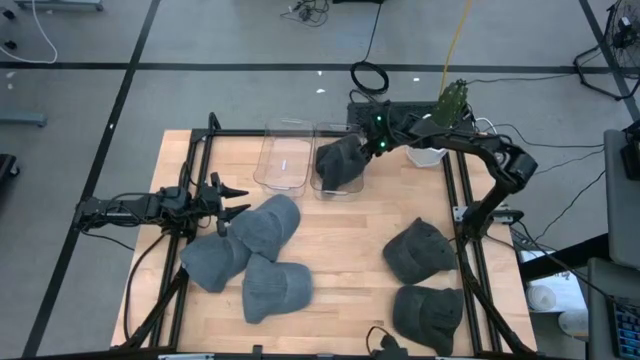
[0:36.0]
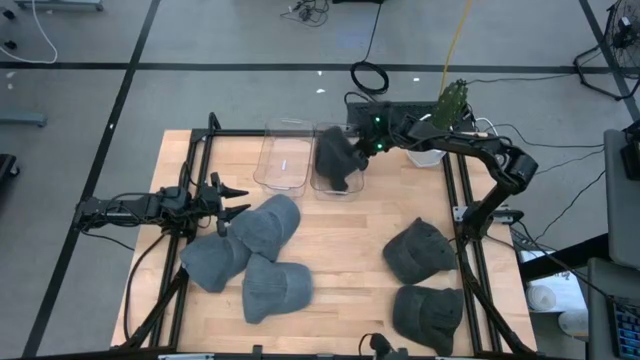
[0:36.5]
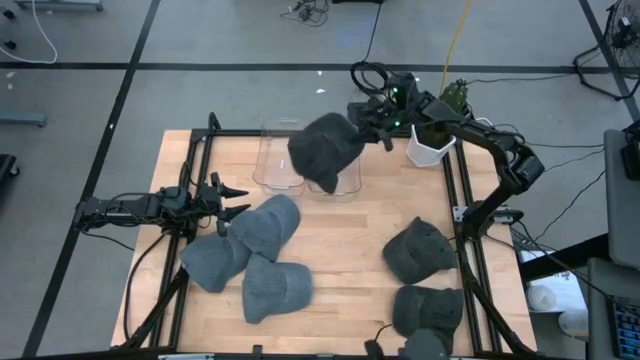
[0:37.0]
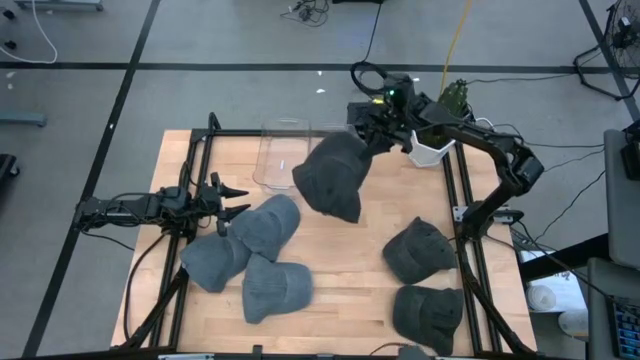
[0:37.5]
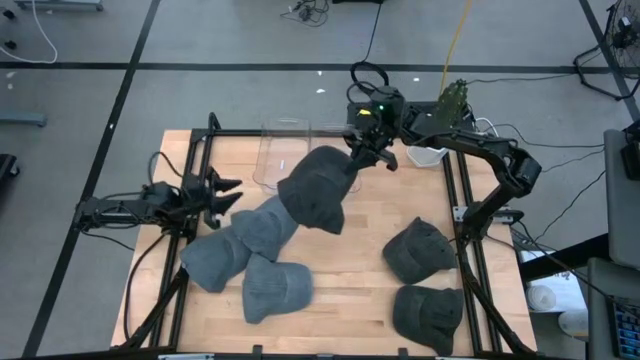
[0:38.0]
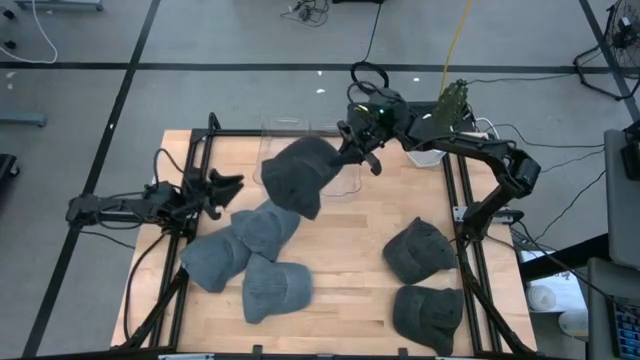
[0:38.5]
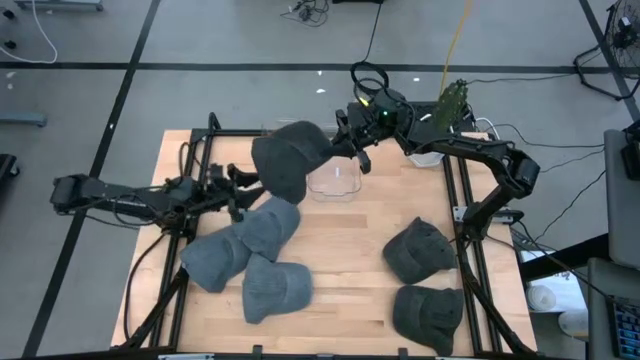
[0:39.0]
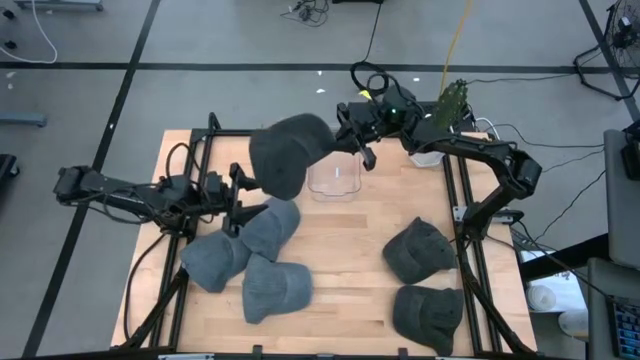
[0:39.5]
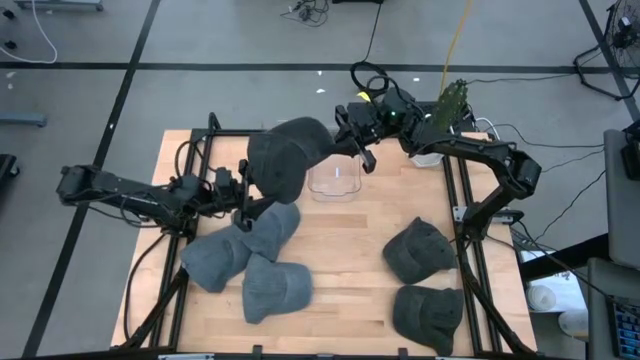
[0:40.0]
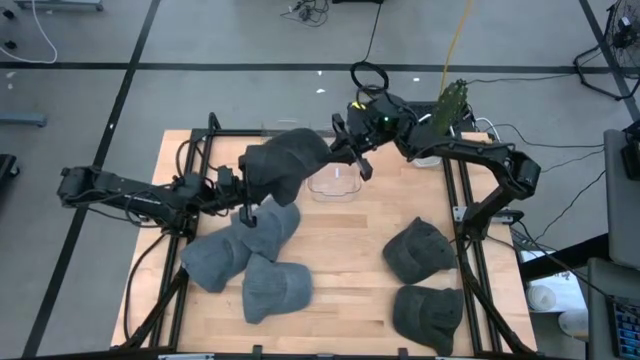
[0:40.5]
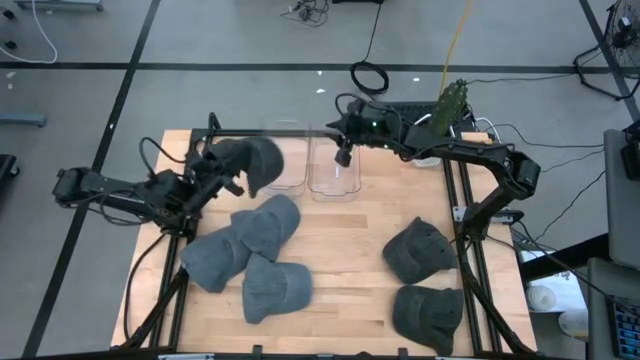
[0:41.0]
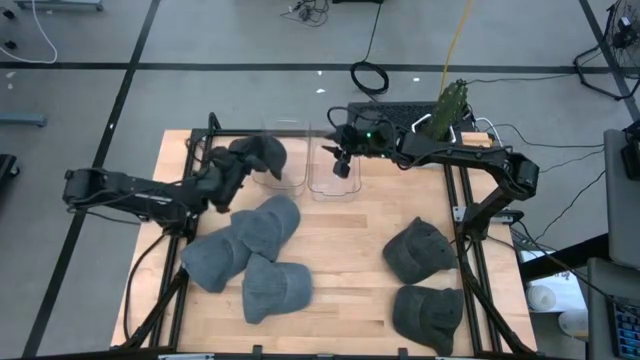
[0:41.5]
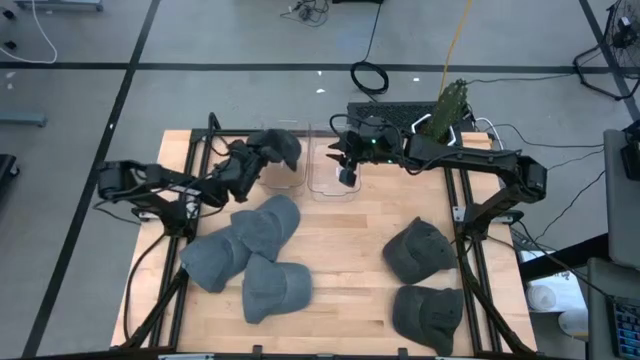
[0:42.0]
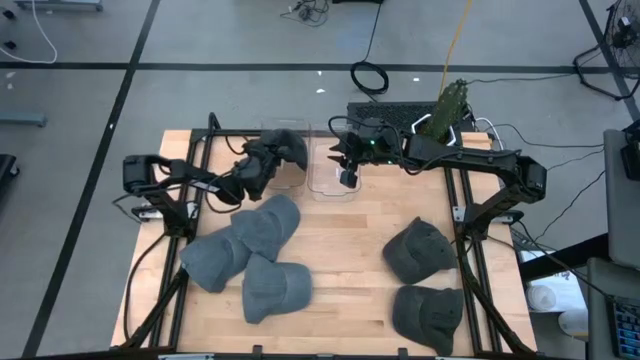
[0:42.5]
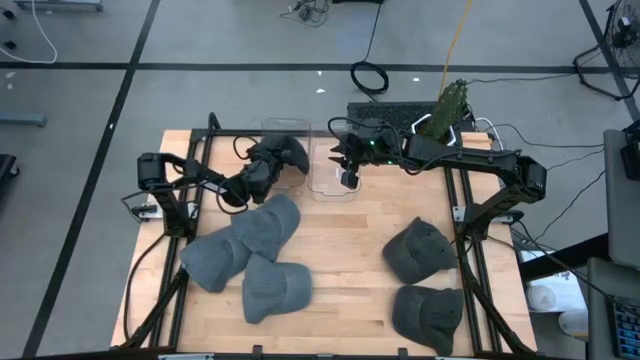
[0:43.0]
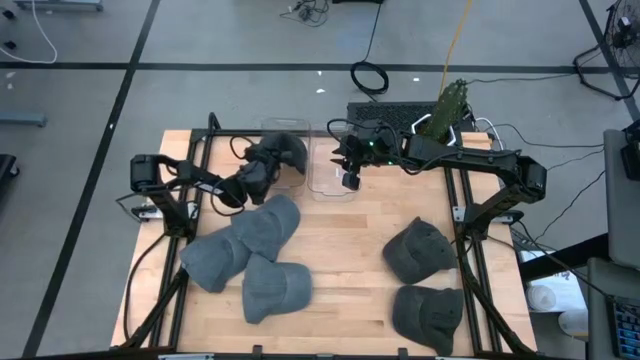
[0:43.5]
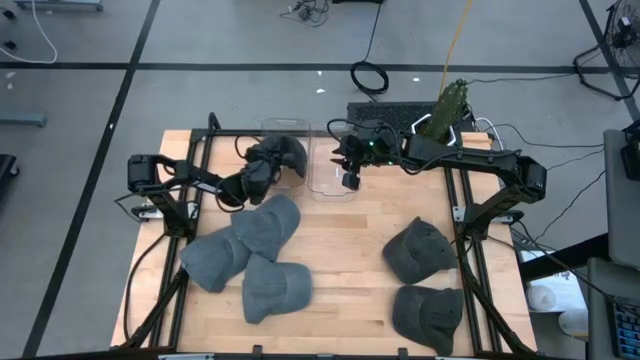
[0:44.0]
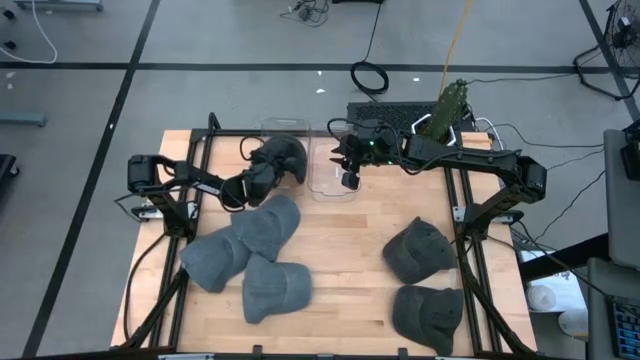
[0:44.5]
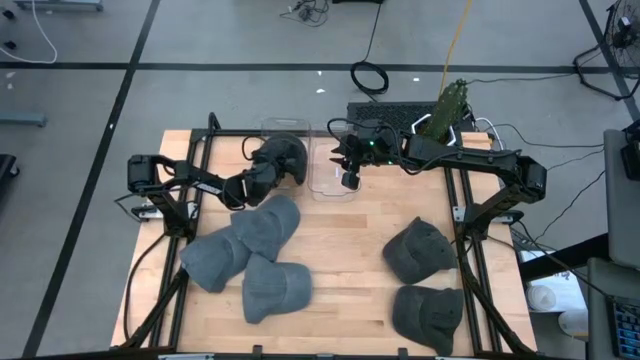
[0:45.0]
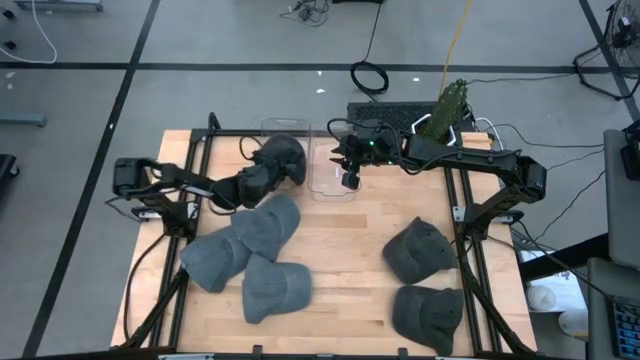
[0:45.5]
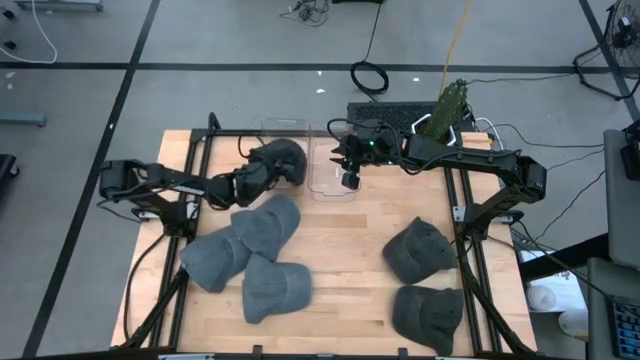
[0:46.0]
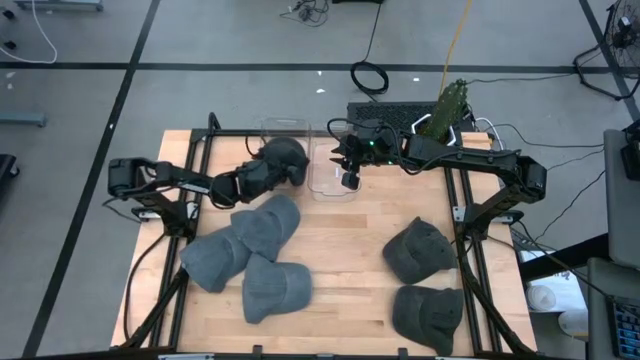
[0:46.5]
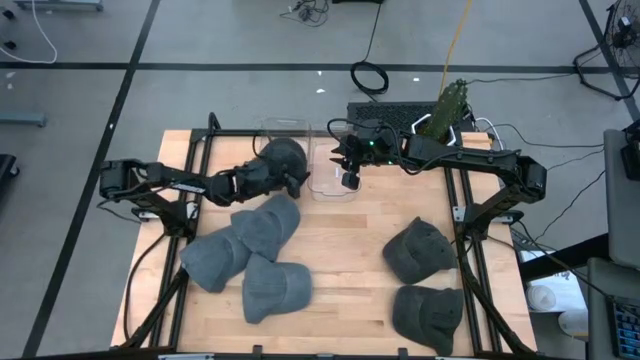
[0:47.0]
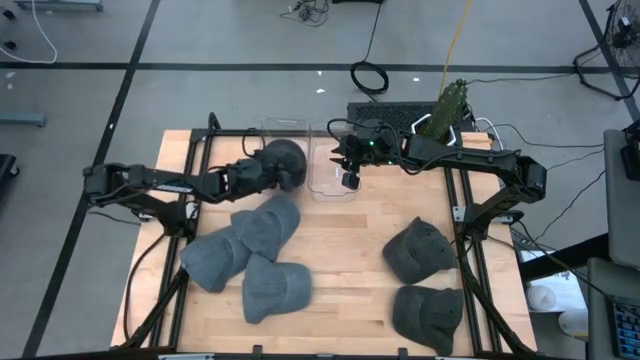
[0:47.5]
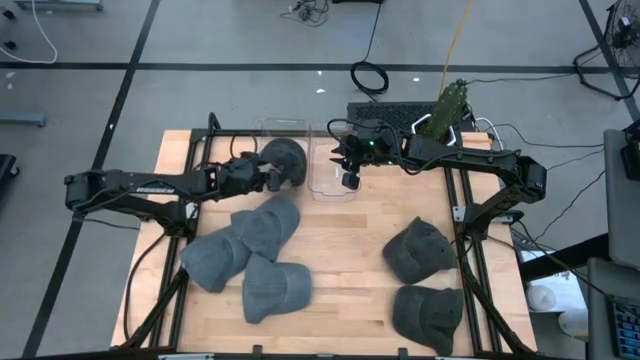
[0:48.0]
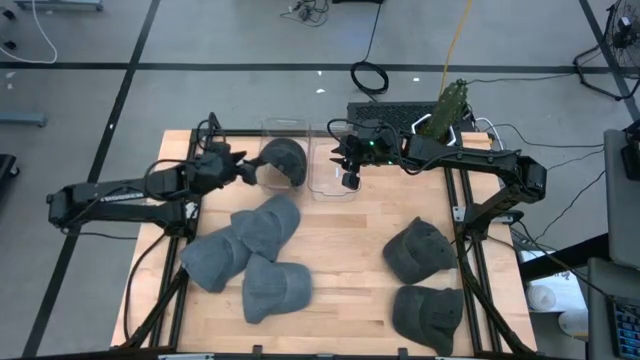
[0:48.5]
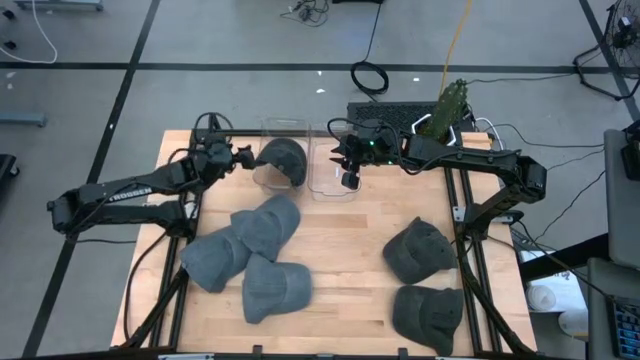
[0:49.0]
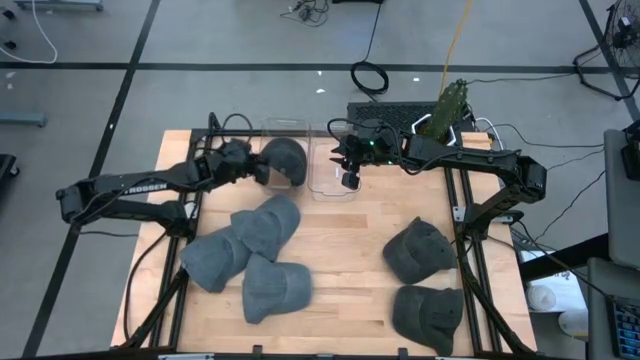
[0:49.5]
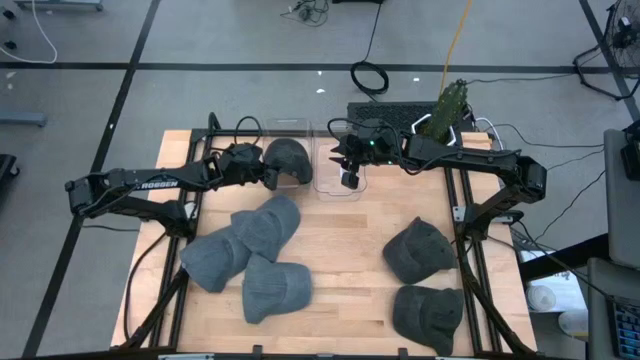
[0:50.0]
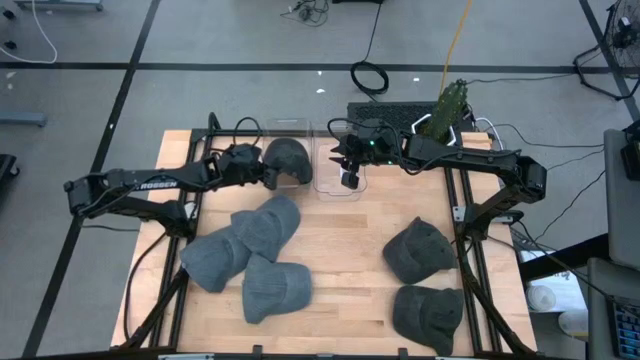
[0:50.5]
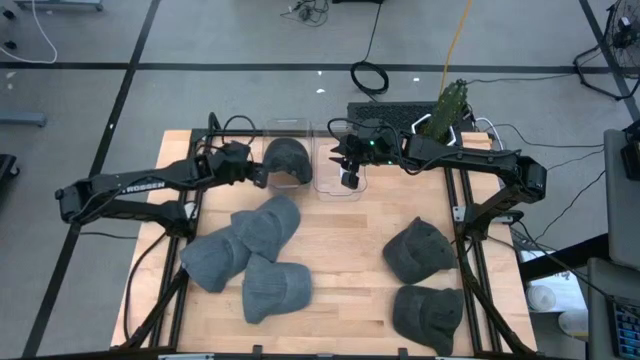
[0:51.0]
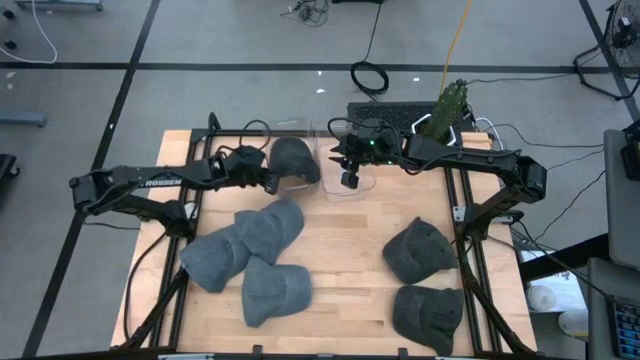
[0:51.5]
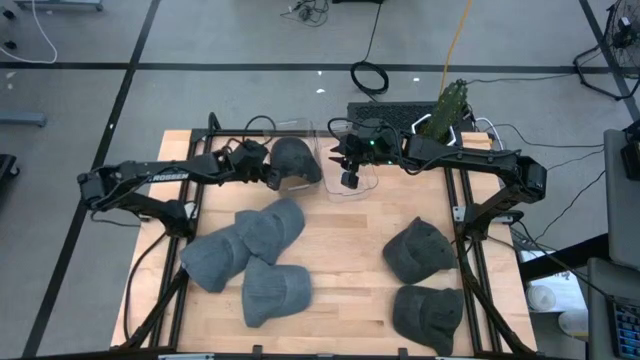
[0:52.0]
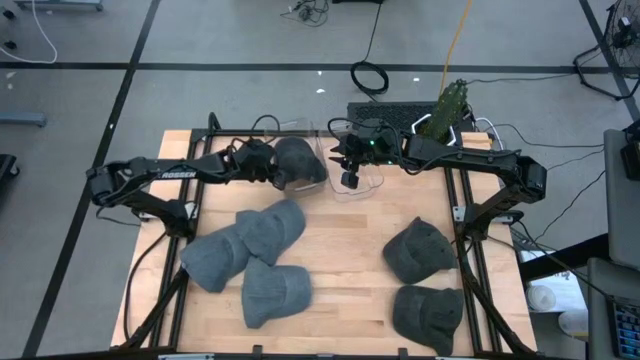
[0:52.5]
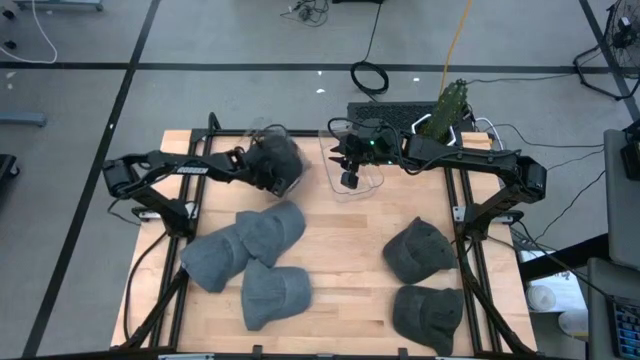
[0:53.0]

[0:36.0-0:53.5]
Task: Pick & Place hat
Put the top black cap into the left transparent bin

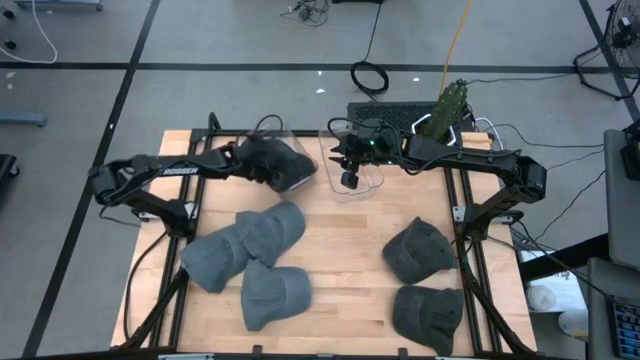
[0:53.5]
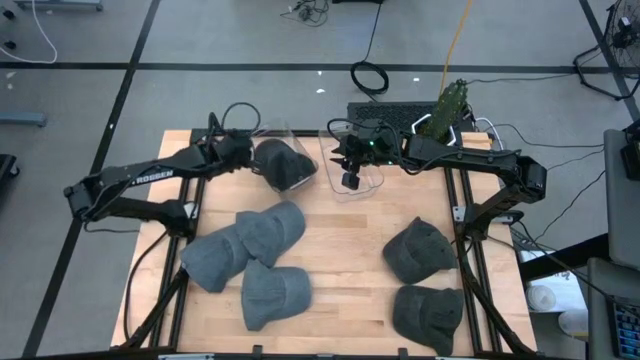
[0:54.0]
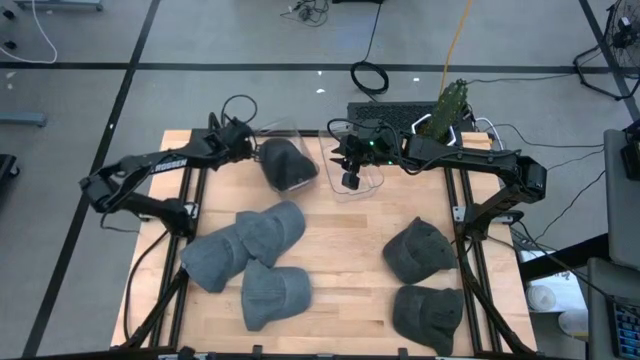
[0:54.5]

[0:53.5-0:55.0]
Adjust the left transparent bin

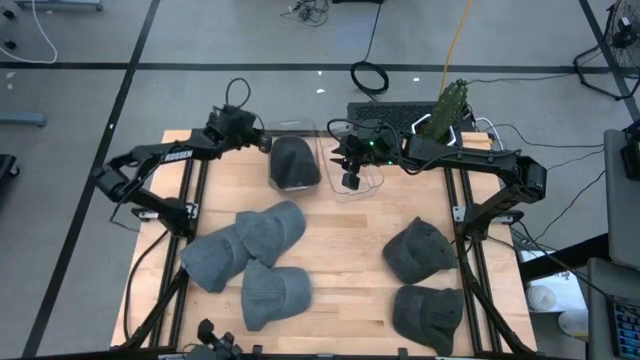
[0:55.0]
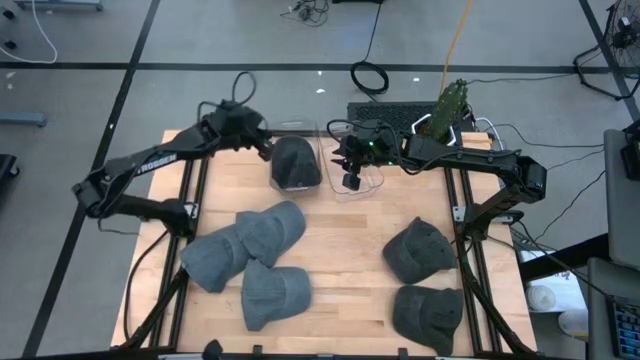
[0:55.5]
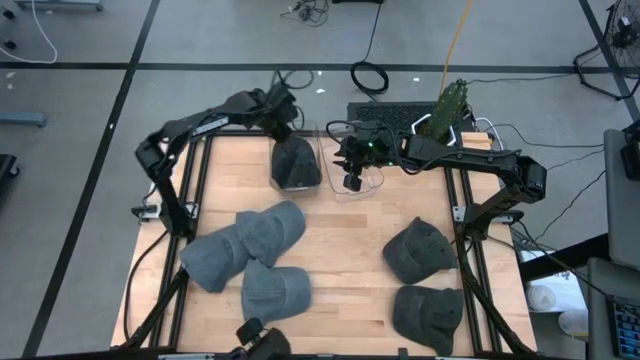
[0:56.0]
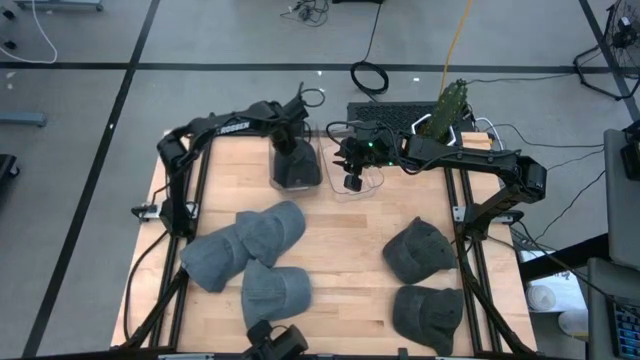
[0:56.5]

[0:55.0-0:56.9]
Adjust the black cap in the left transparent bin

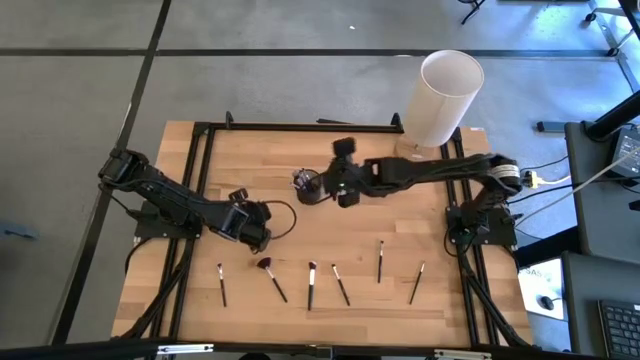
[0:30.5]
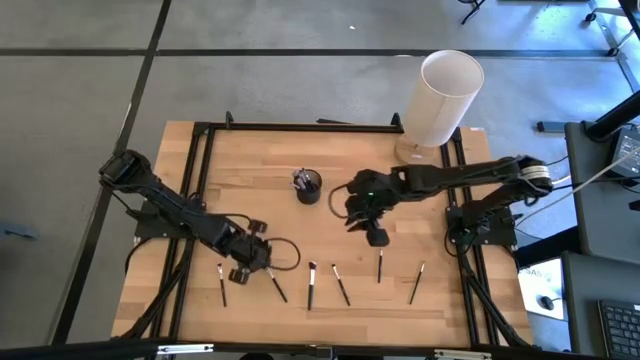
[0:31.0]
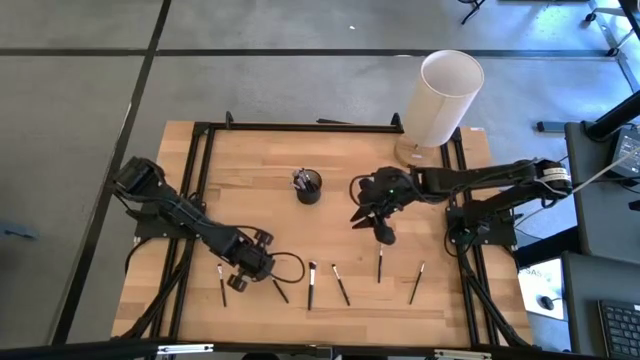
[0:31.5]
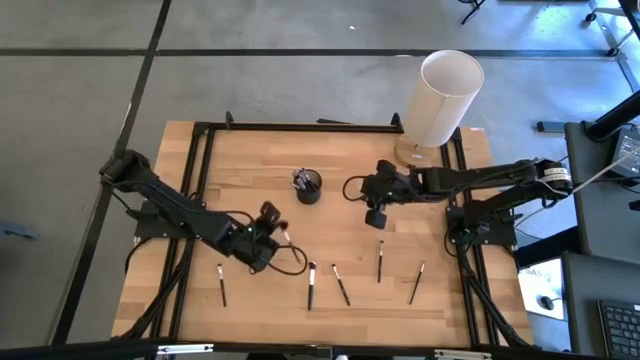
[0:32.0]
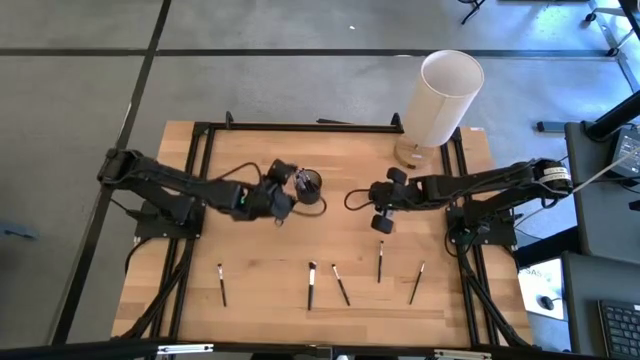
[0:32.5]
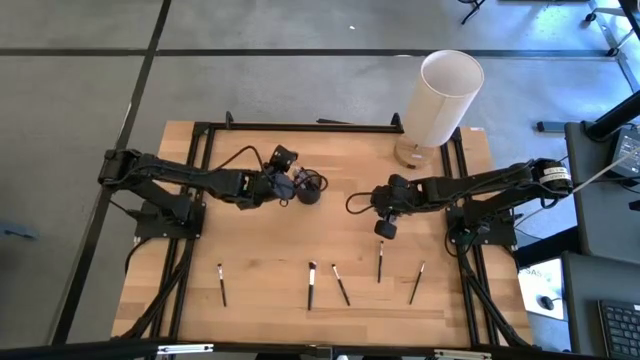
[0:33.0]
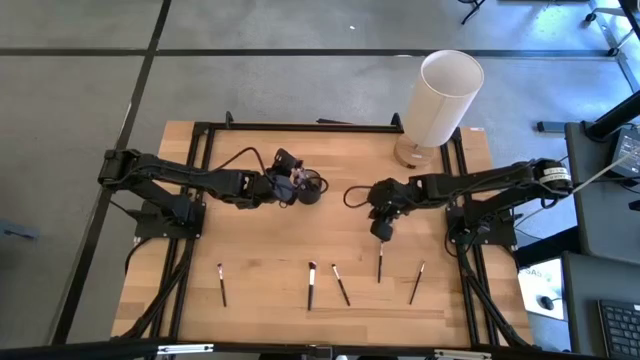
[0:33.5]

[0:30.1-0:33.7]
Task: Put items in baskets/containers
Put the black highlighter brush into the black pen holder
